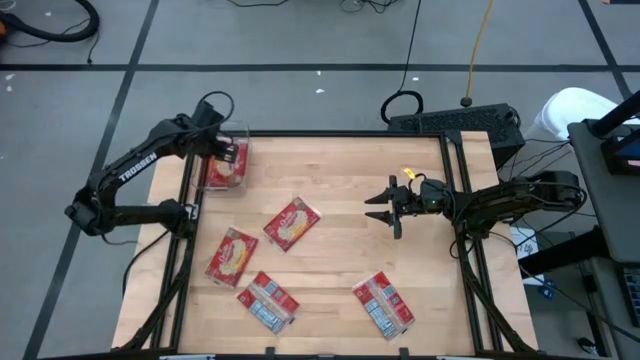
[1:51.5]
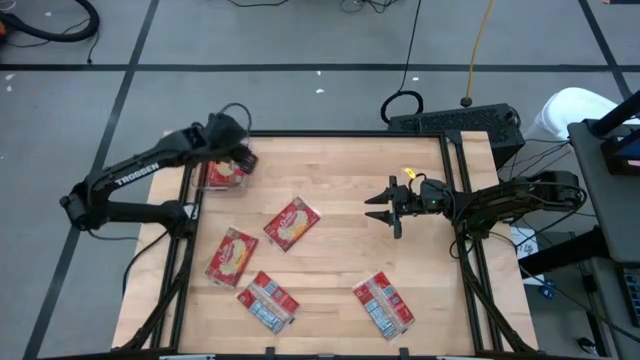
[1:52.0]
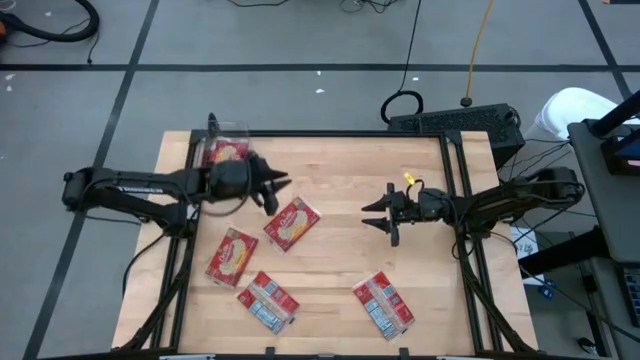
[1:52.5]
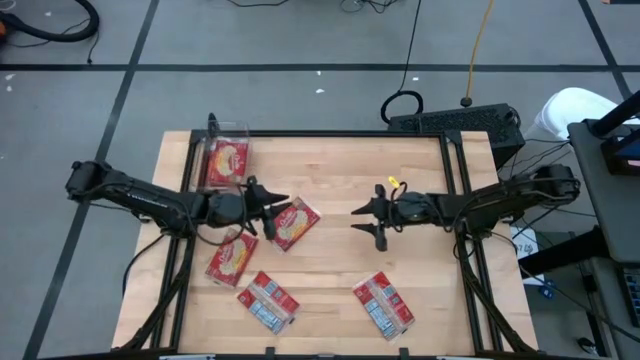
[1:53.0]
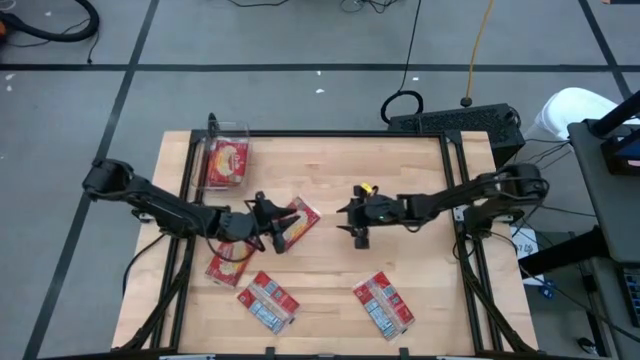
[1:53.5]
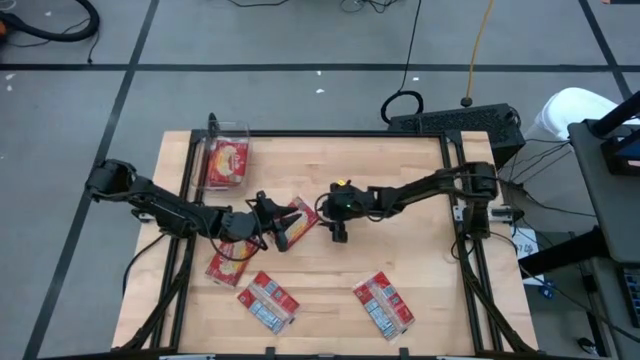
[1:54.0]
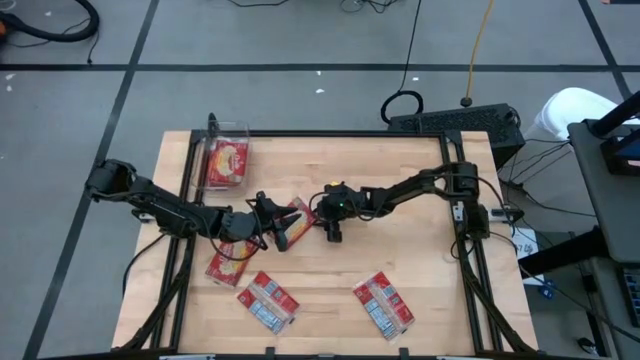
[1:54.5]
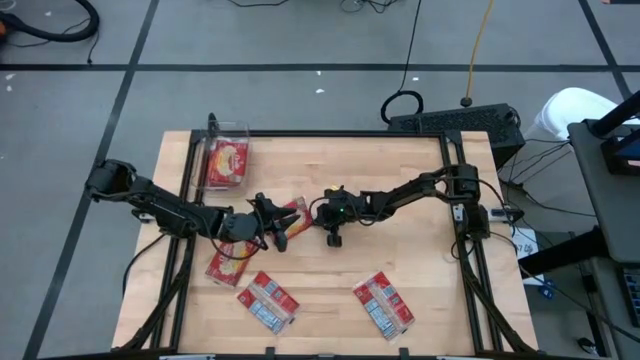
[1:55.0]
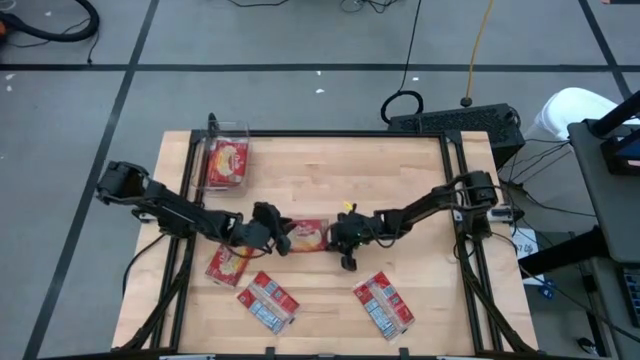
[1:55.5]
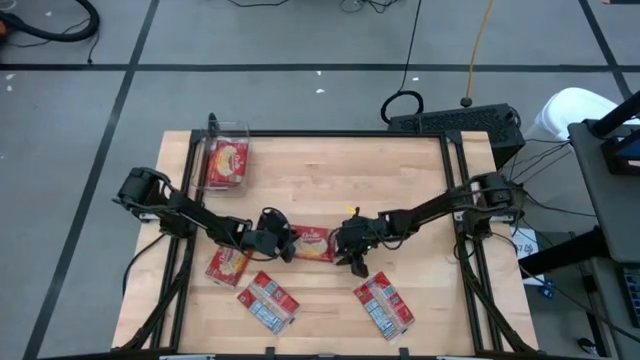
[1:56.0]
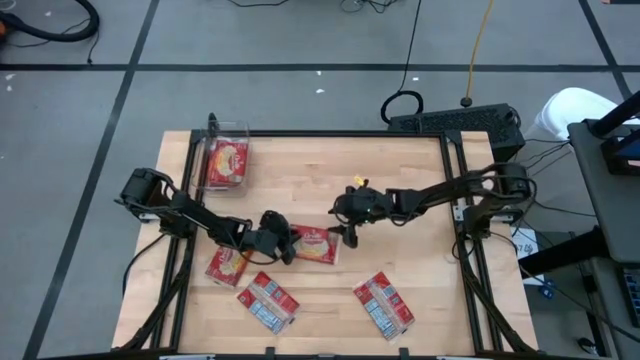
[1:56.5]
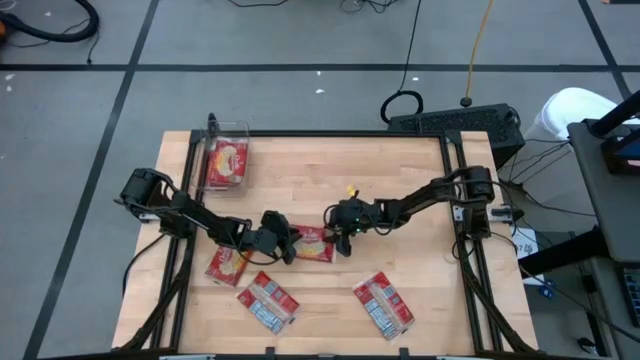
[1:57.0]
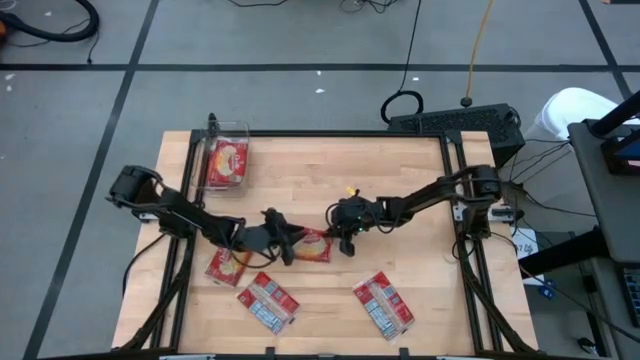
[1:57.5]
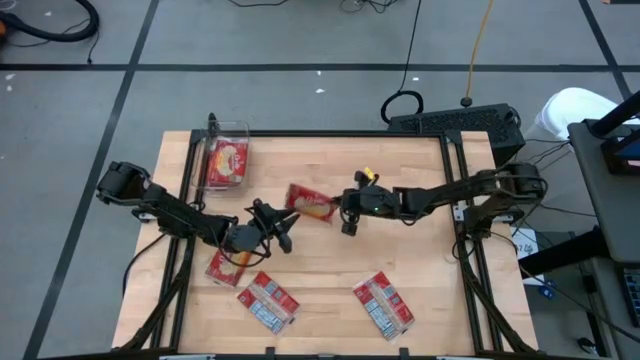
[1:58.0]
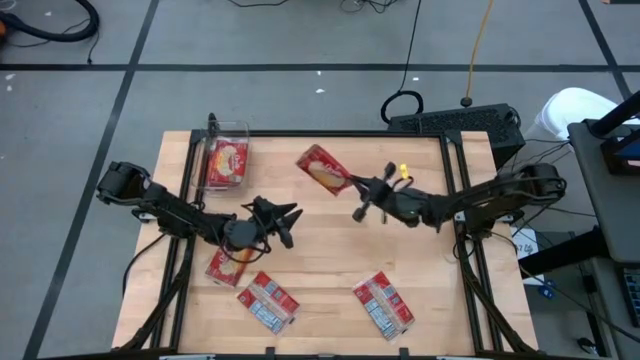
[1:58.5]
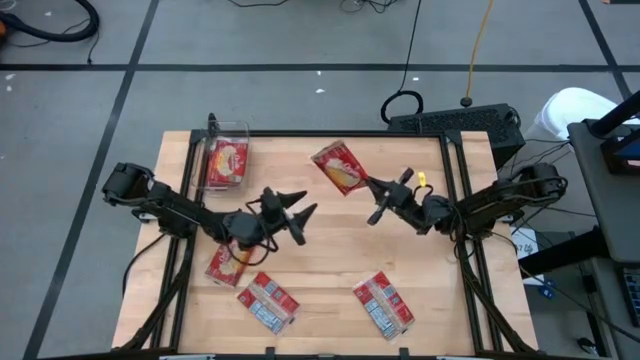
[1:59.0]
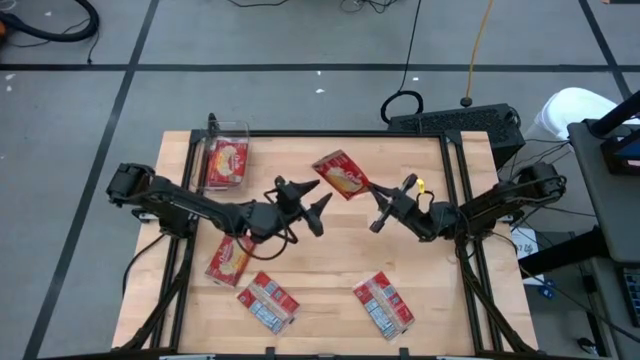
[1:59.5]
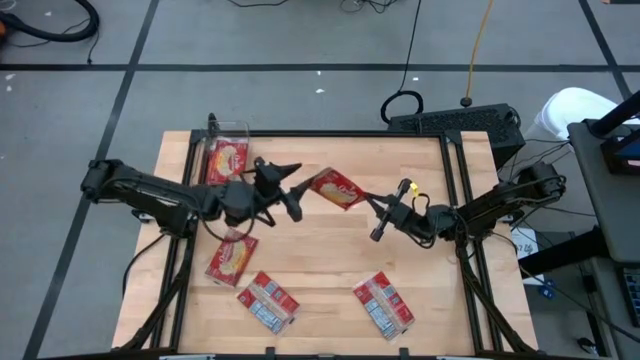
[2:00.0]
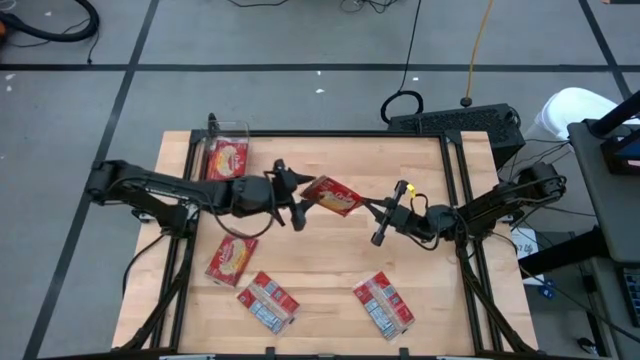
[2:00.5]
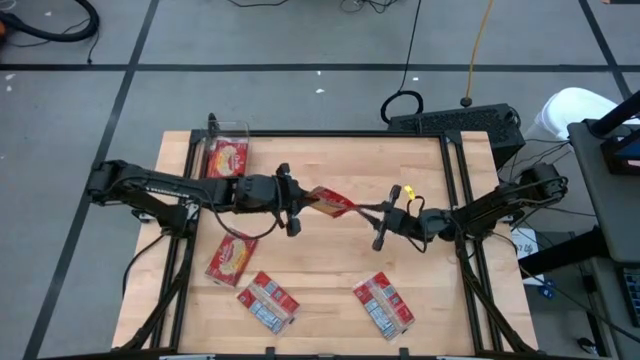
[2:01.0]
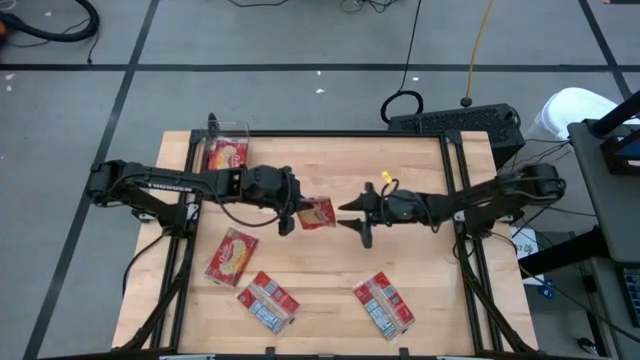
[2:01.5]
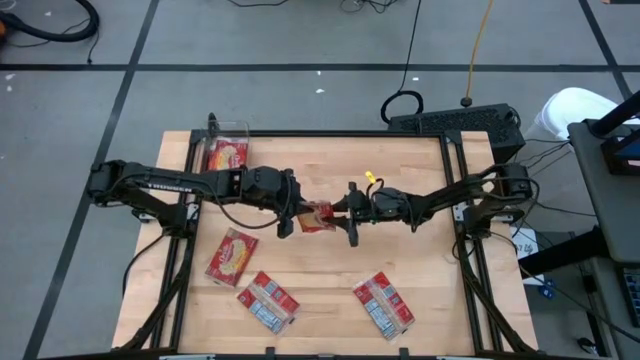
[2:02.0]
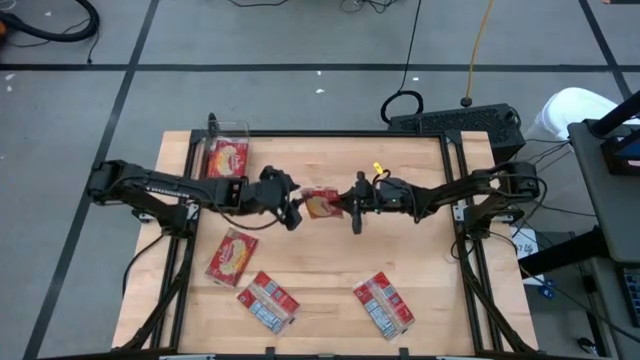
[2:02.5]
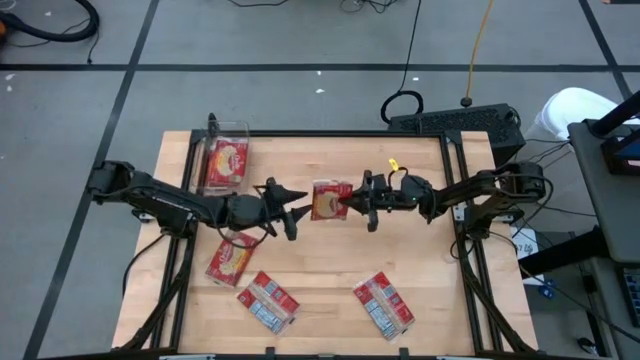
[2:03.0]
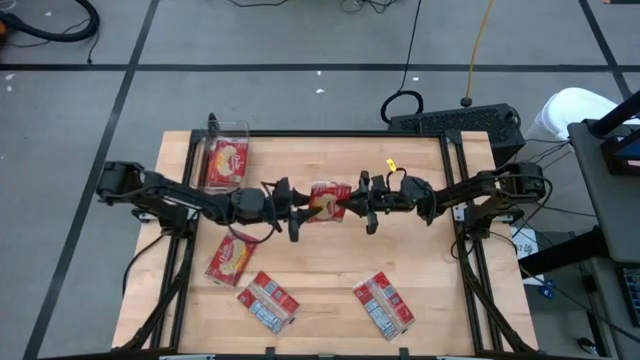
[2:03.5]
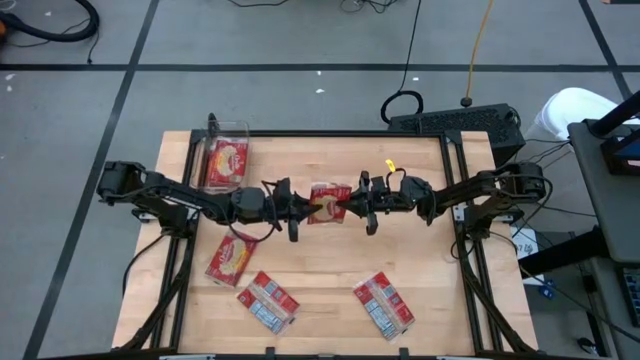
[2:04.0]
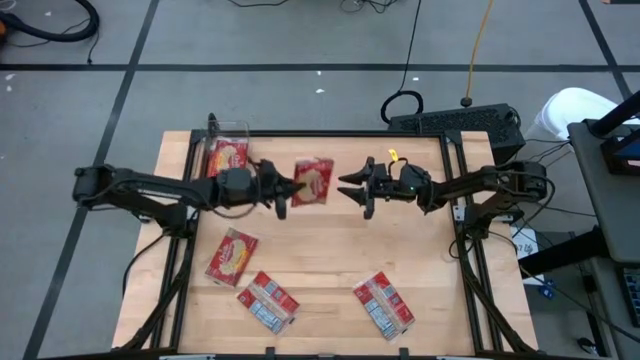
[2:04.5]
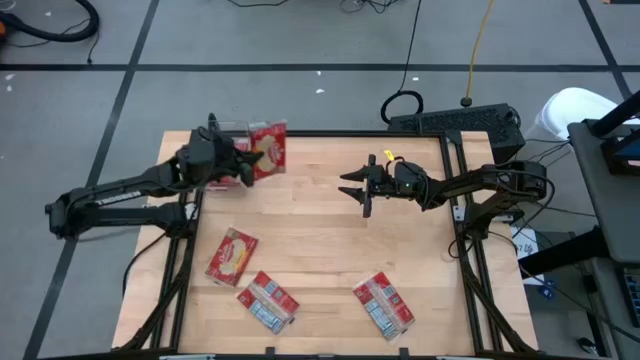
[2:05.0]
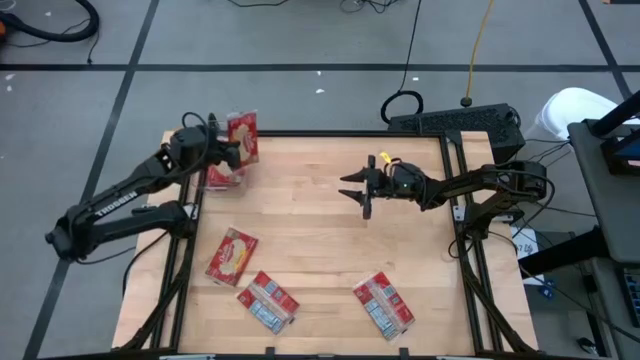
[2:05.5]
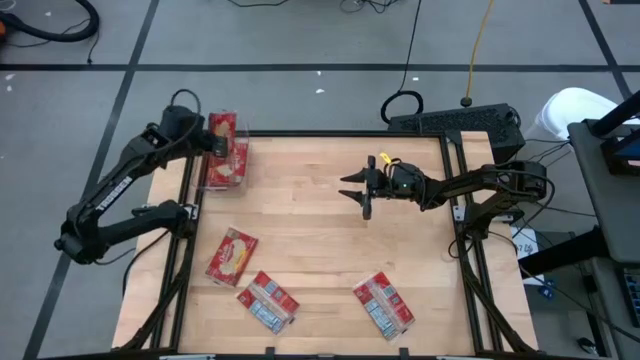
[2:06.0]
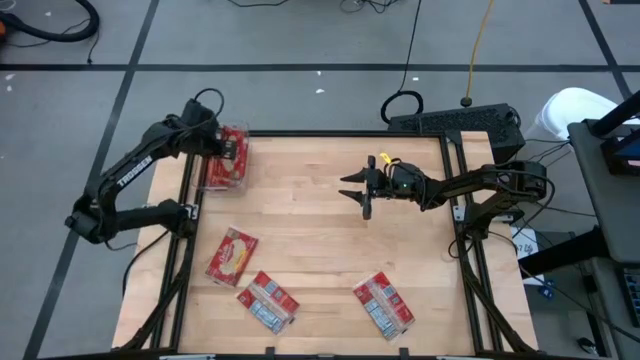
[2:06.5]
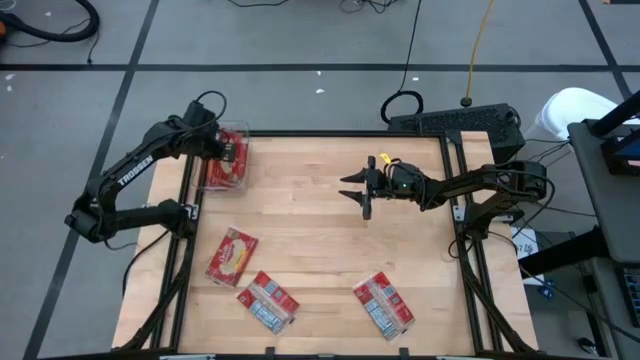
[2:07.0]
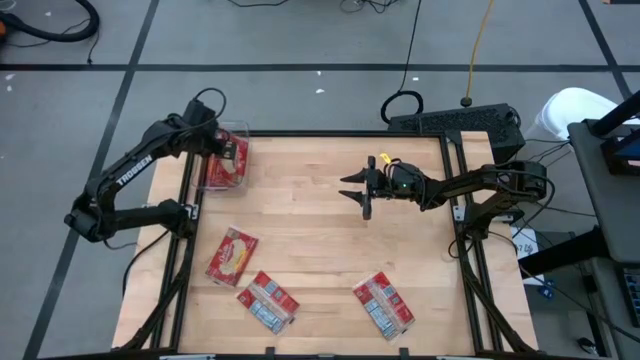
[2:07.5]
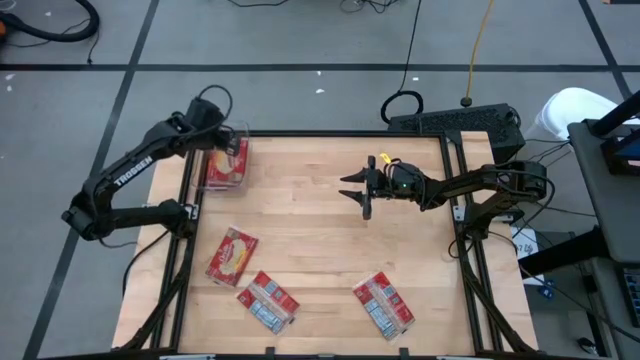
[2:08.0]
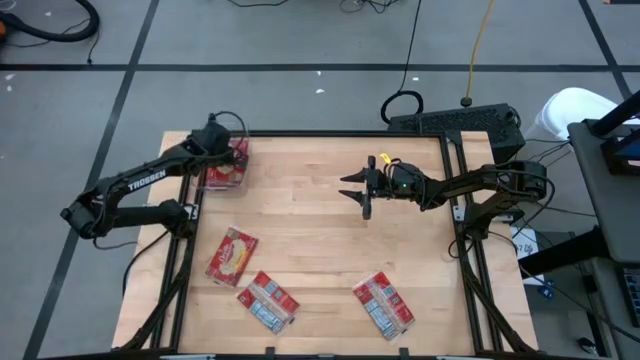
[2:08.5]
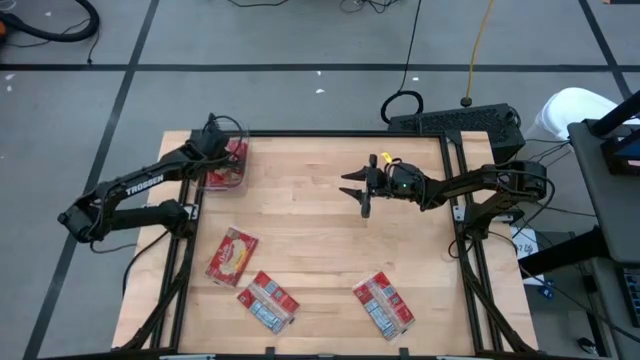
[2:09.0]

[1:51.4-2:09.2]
Task: Sort popcorn bags into baskets
Put the red popcorn bag into the transparent bin

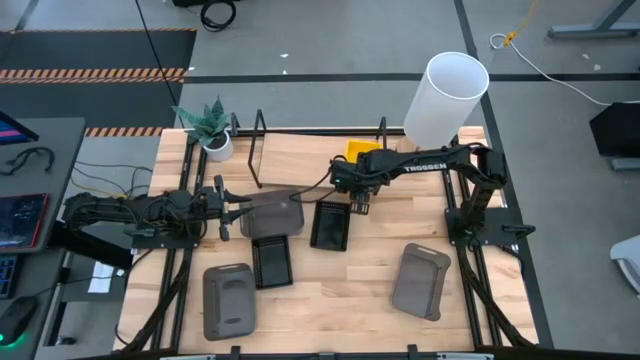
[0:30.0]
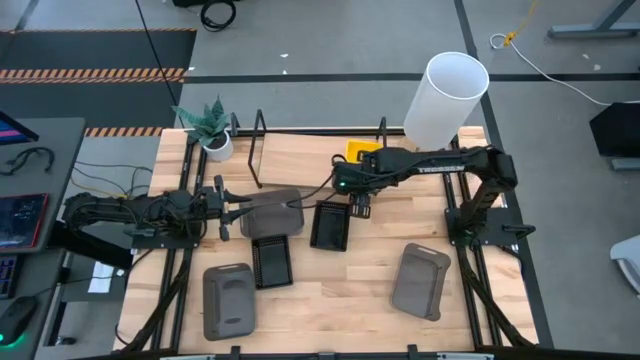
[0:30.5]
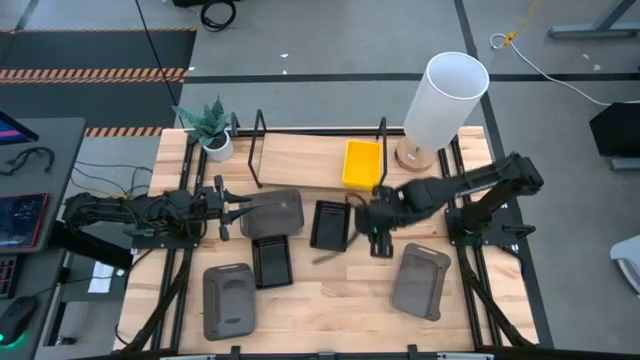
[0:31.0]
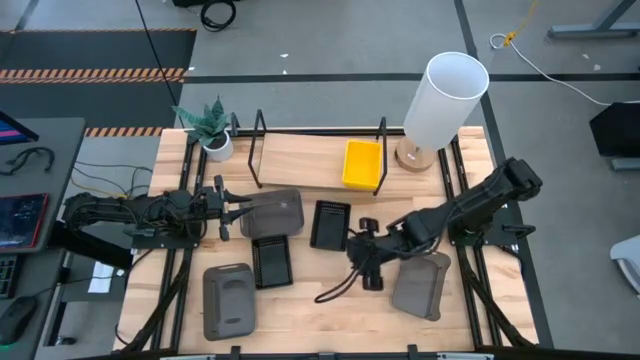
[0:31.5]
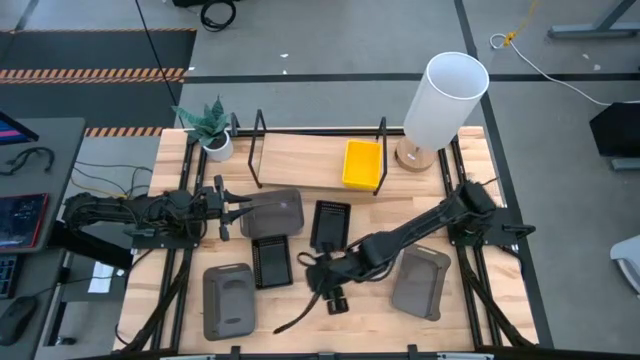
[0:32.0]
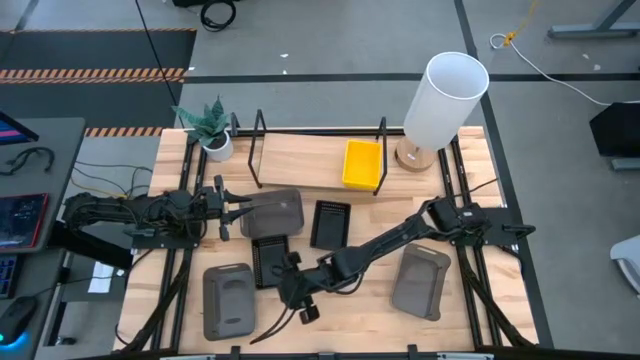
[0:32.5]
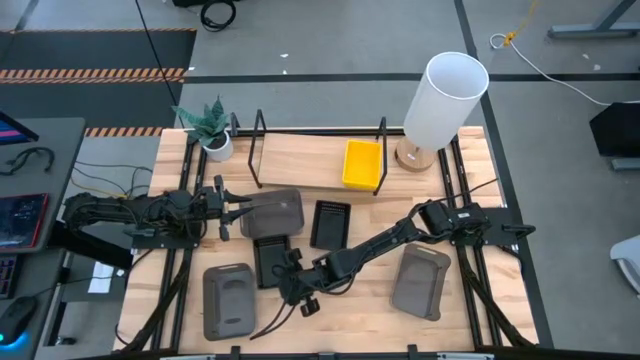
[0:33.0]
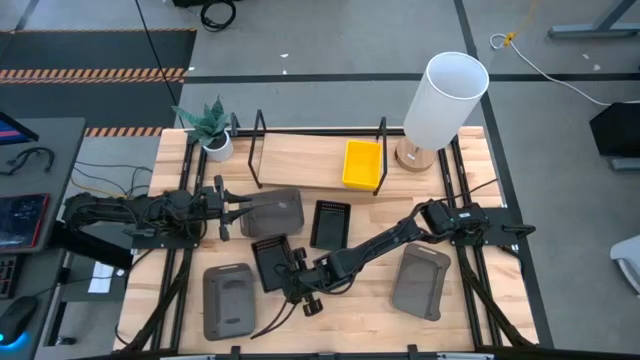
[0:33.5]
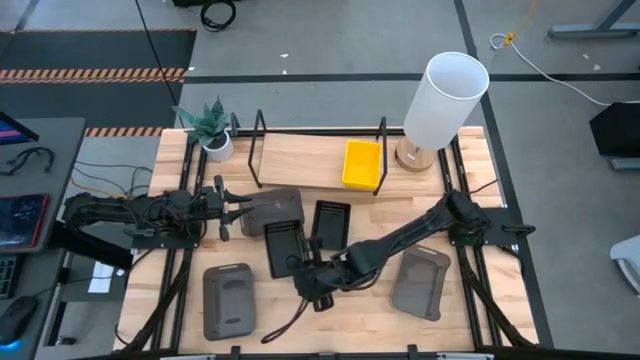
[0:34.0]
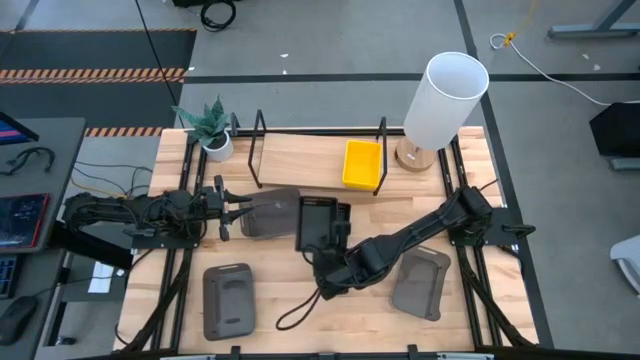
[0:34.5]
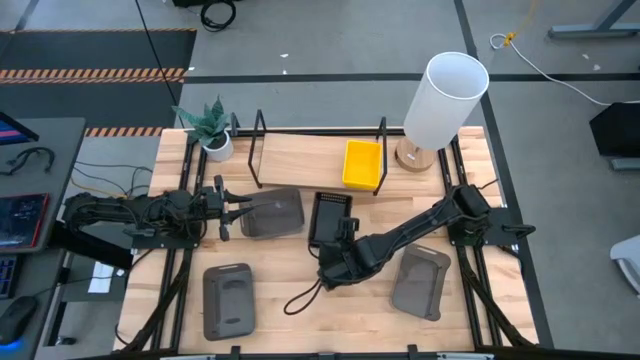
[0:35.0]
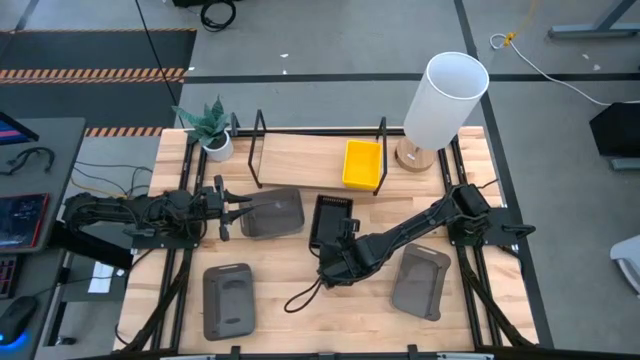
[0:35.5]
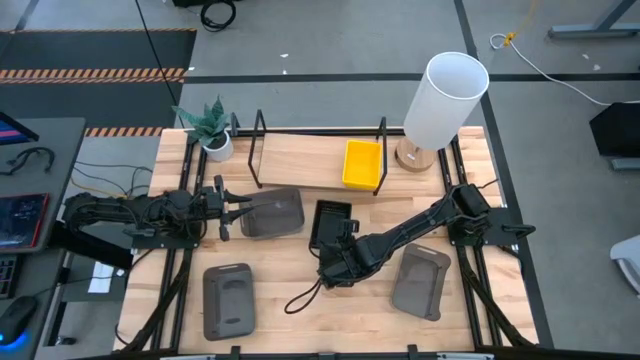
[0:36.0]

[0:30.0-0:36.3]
Task: Stack baskets on shelf by color
Stack the bottom black bin on top of the top black bin
